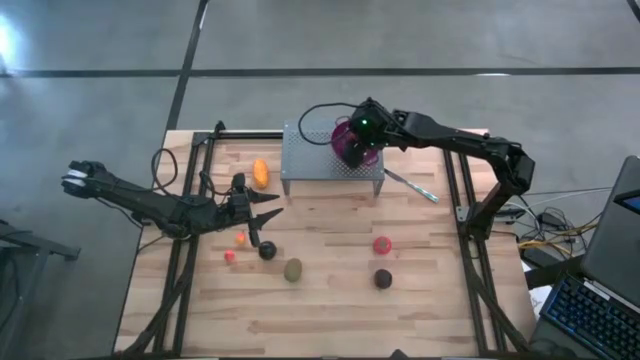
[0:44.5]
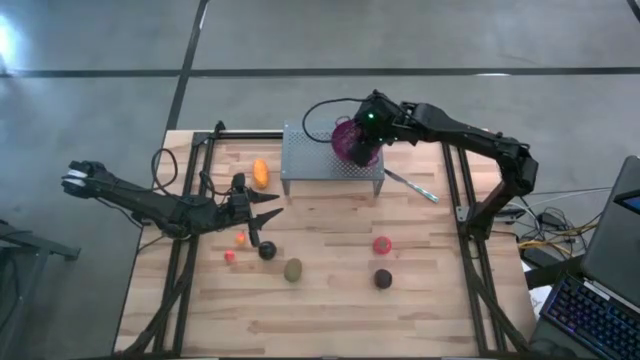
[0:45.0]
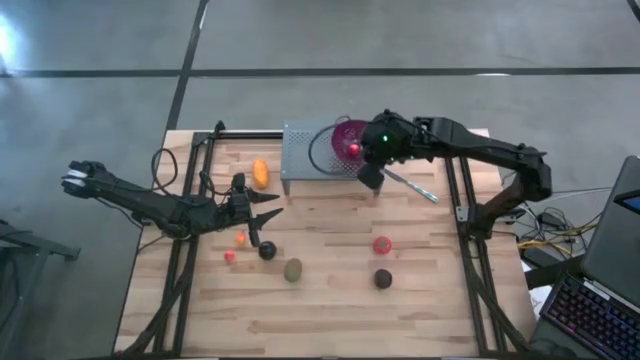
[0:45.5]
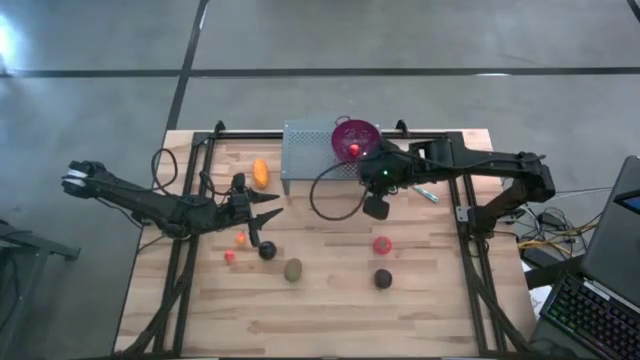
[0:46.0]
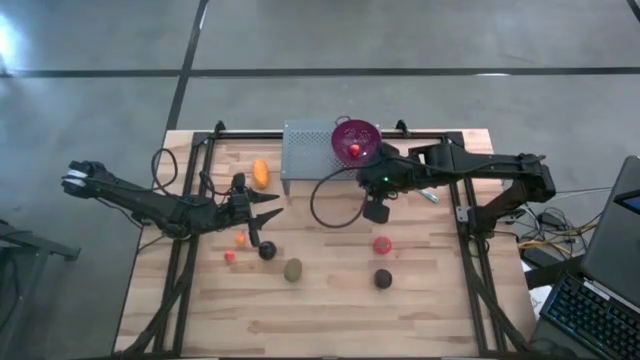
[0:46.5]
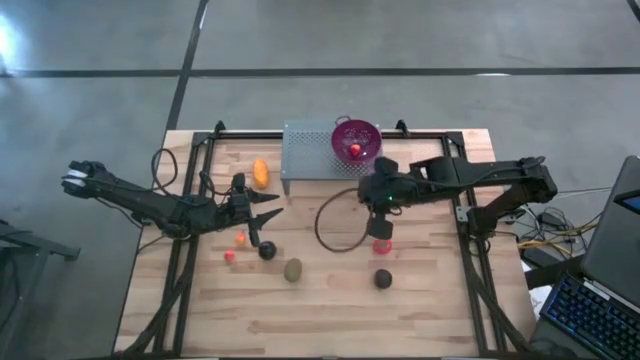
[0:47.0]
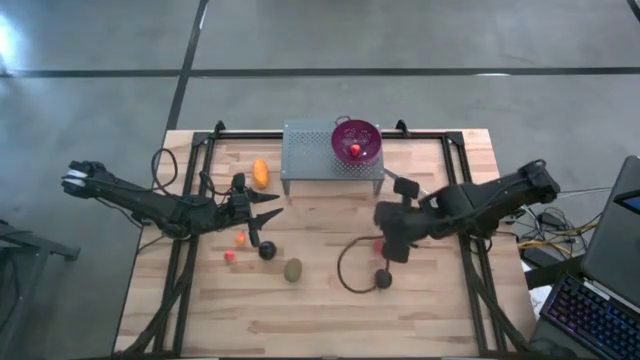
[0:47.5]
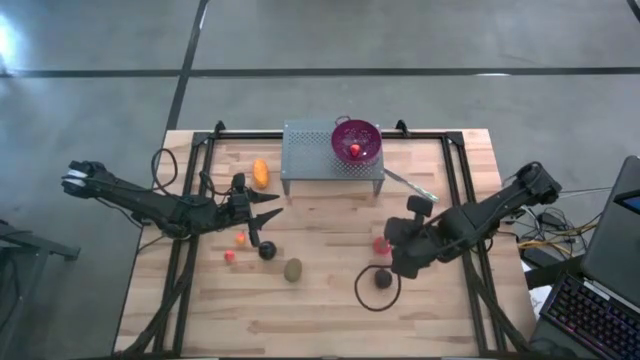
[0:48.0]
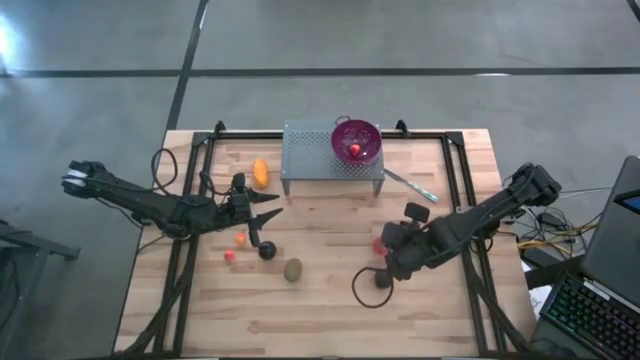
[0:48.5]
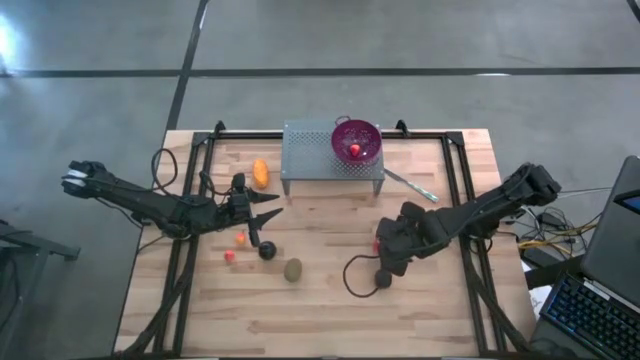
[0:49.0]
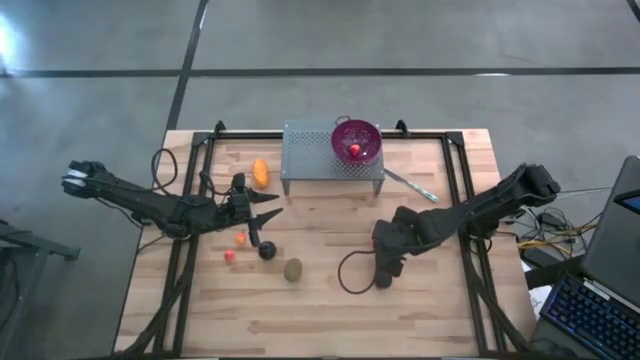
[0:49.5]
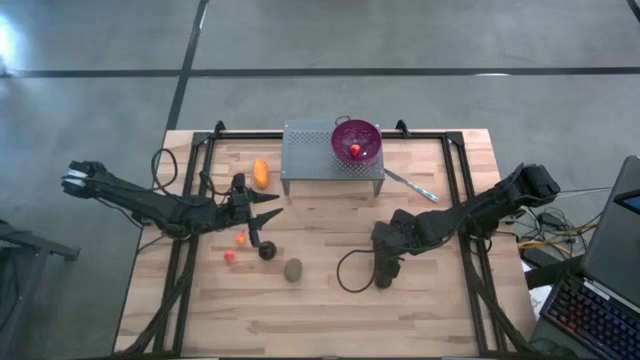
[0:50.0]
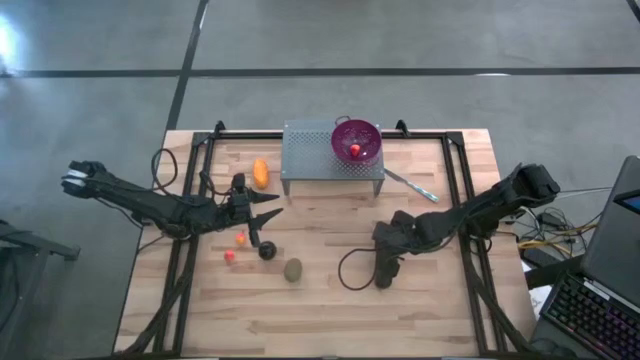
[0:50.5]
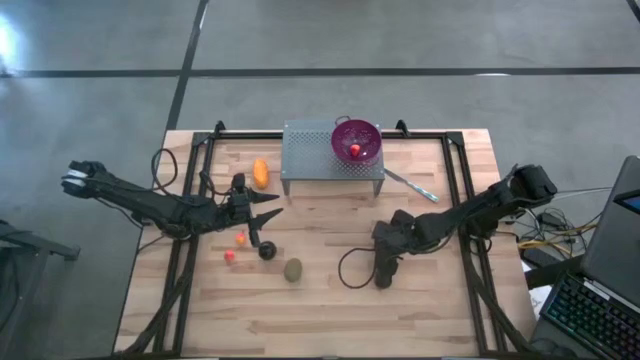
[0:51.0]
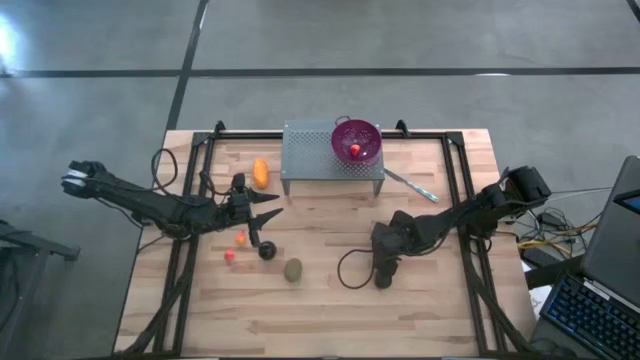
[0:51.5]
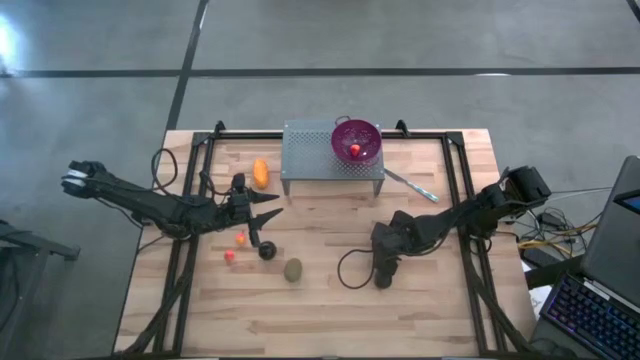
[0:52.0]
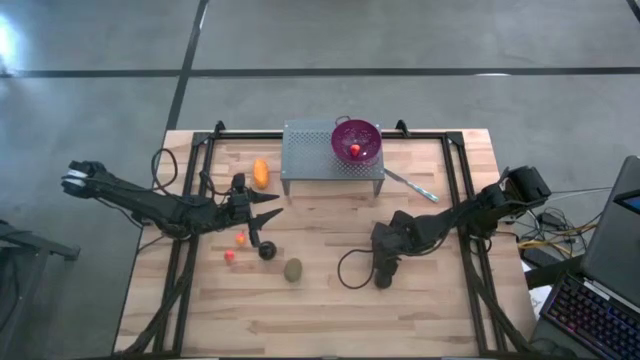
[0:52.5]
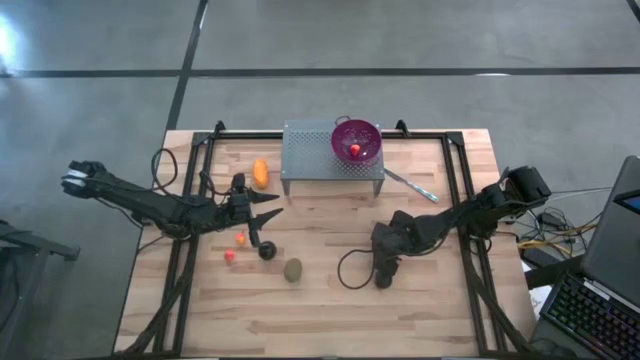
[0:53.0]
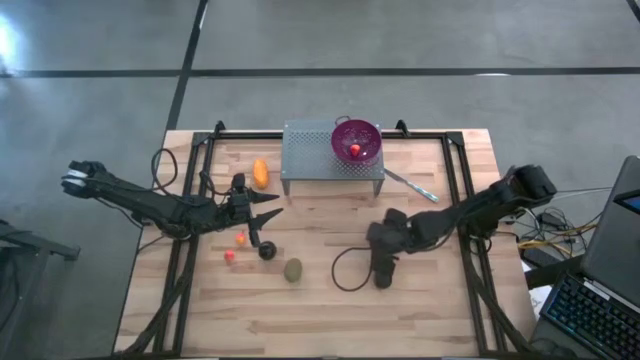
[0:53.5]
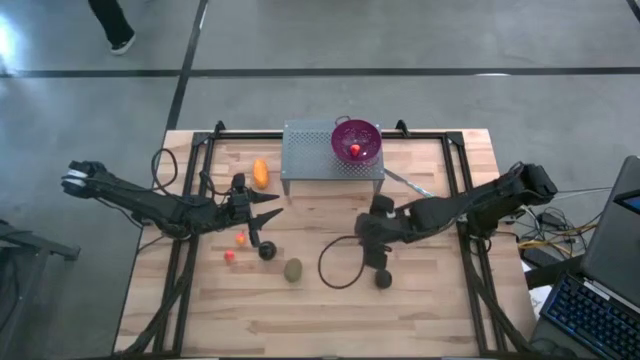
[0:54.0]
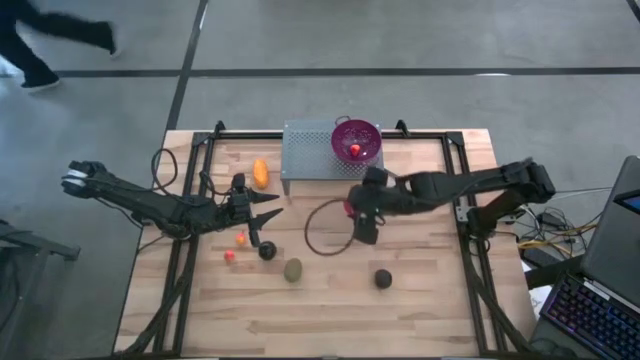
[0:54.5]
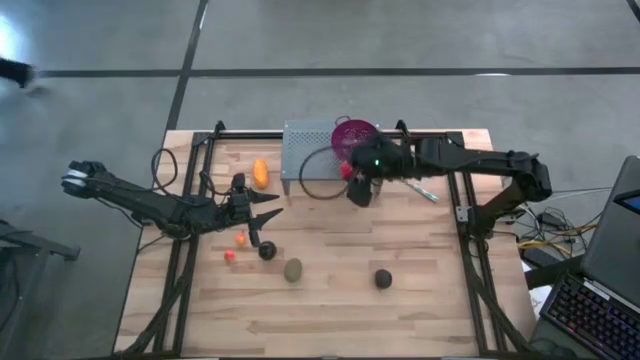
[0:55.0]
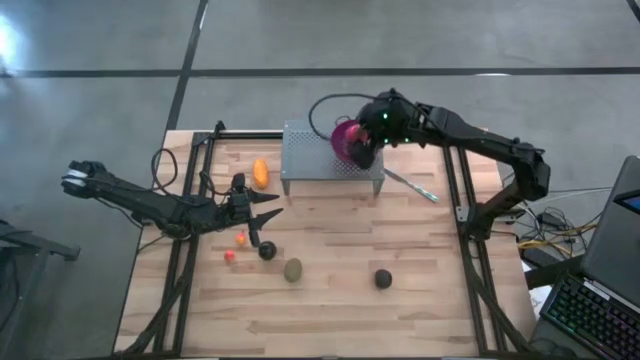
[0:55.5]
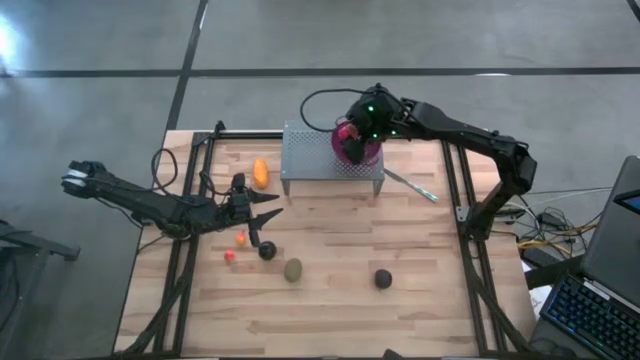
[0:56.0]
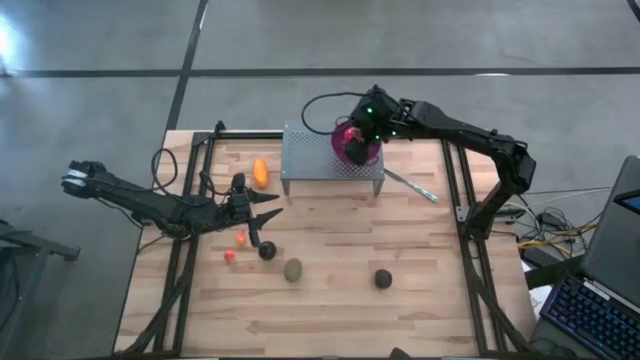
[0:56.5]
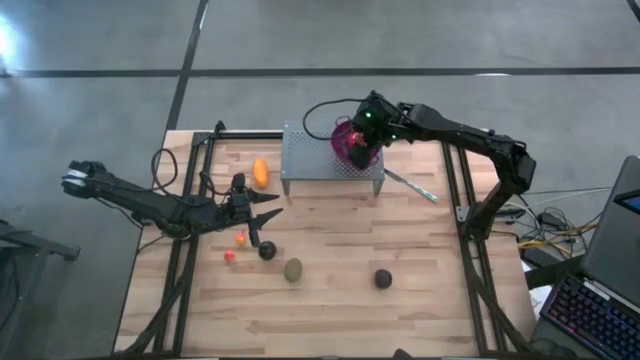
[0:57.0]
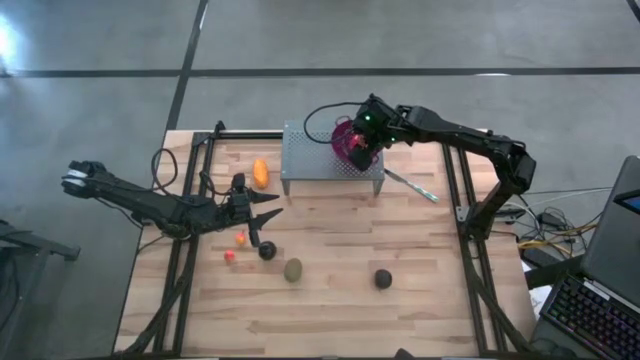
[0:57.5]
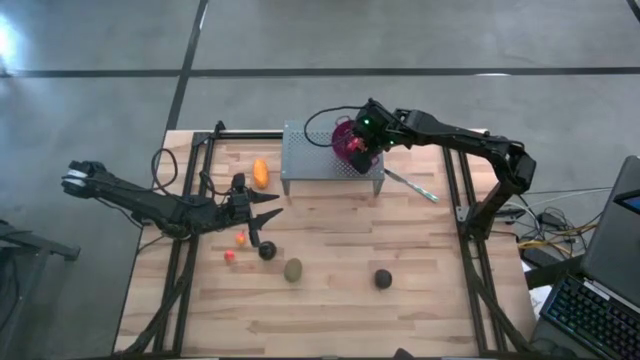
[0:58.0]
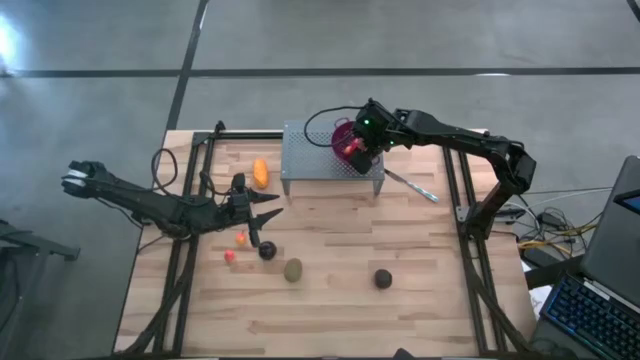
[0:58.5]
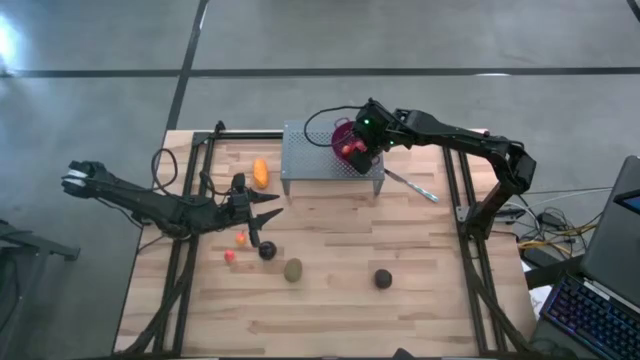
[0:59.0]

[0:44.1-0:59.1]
Task: Pick & Place Fruit
Put the tomato into the purple strainer bowl on the shelf

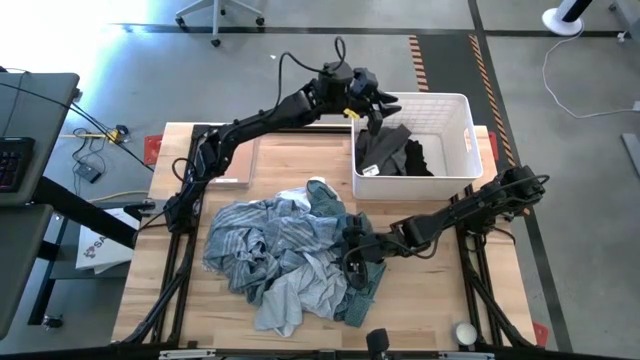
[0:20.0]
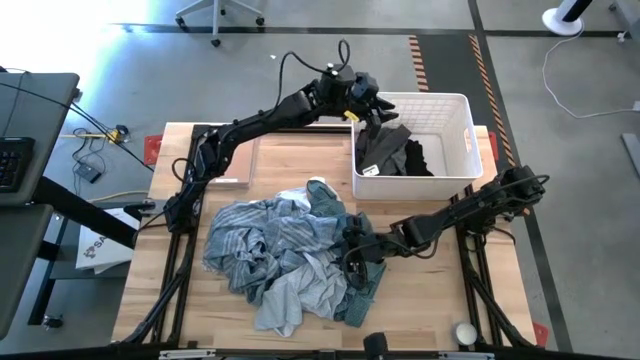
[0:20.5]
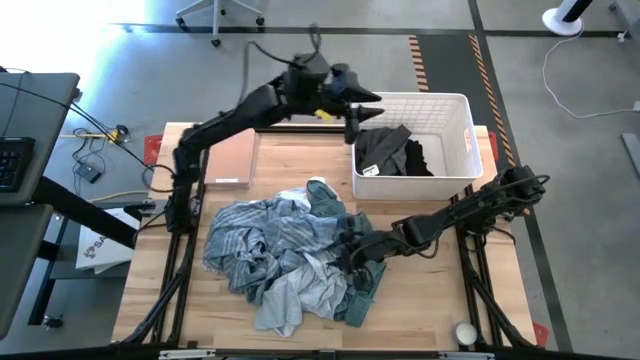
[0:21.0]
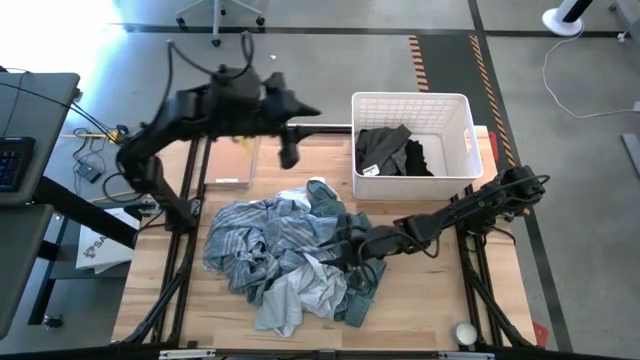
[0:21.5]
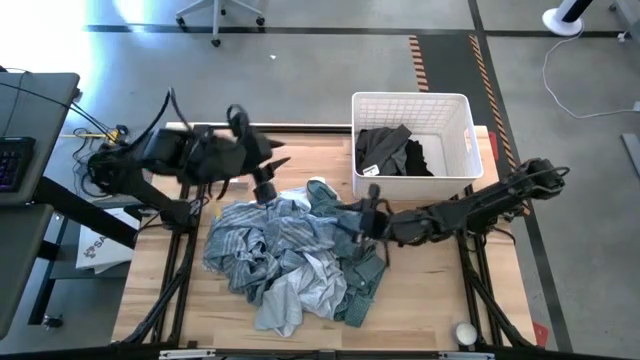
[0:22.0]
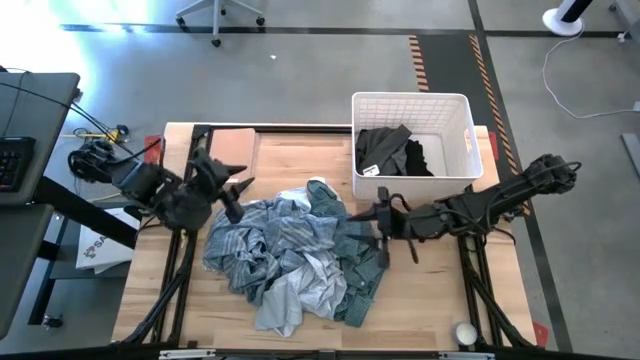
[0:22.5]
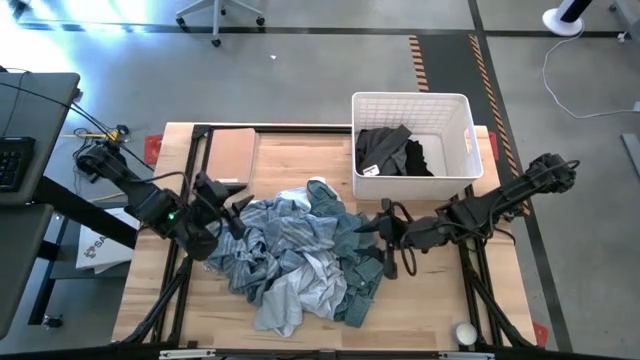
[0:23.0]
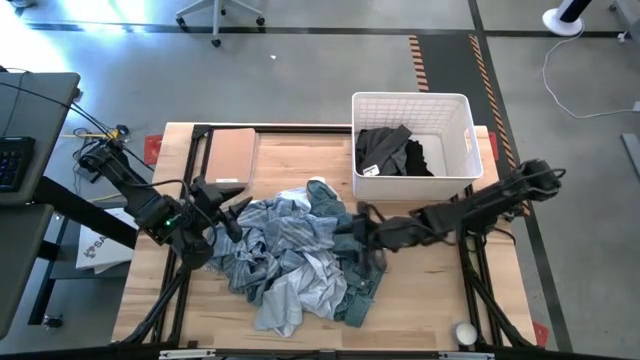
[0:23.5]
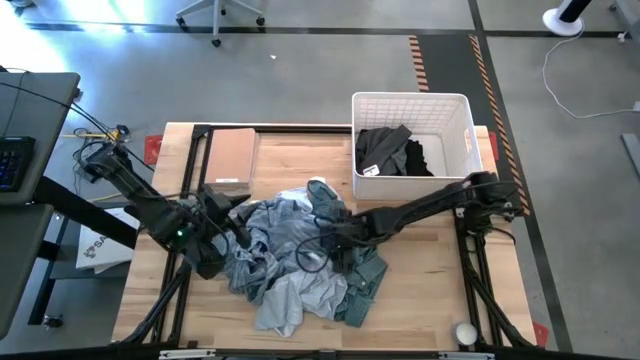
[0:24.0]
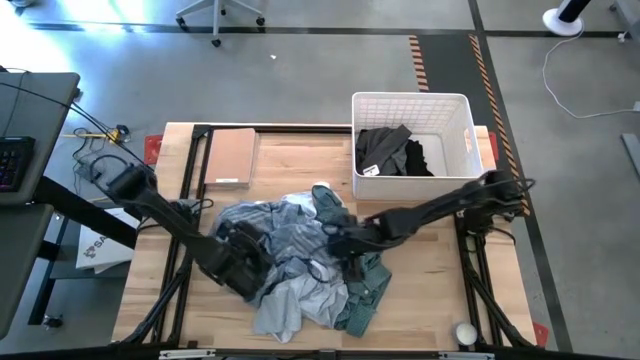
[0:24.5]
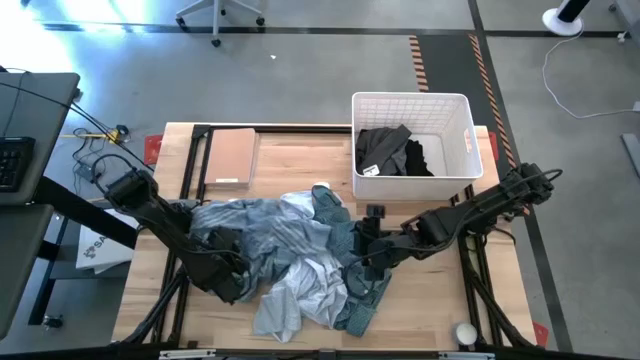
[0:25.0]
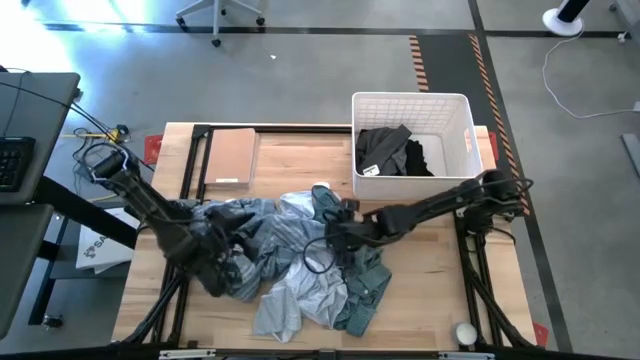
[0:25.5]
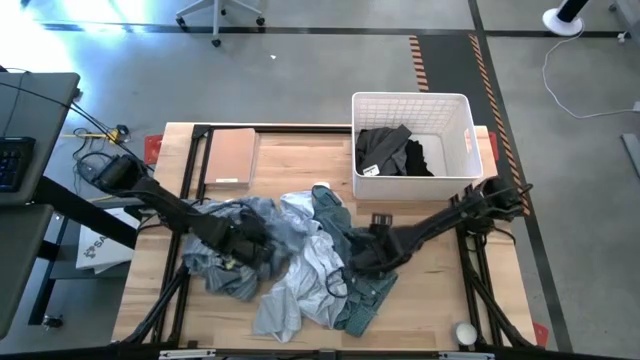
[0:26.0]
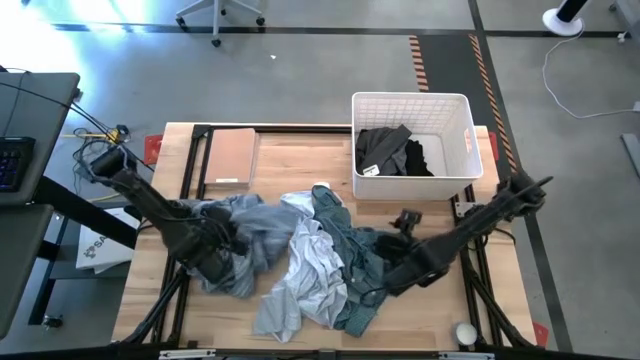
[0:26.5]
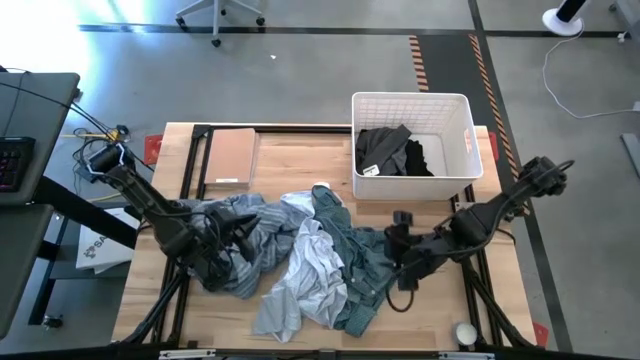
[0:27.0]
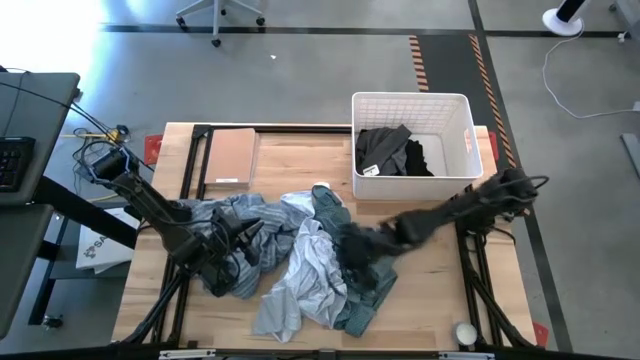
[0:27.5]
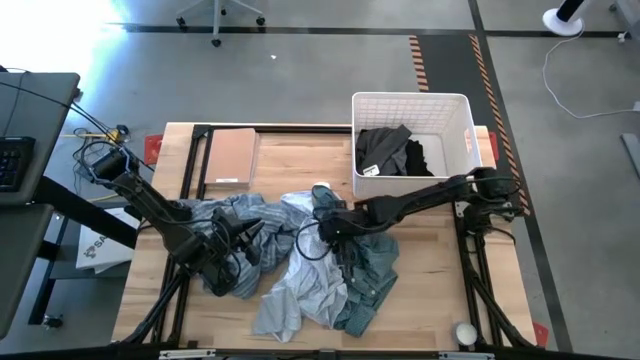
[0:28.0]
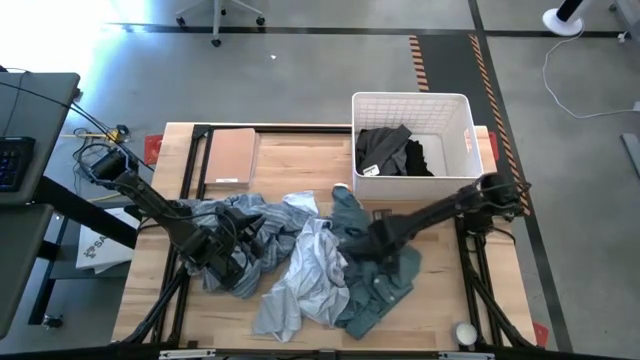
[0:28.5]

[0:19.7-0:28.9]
Task: Sort clothes
Adjust the clothes
